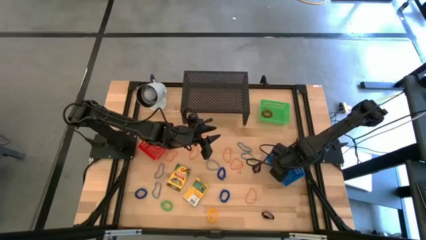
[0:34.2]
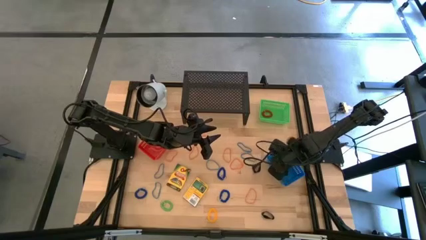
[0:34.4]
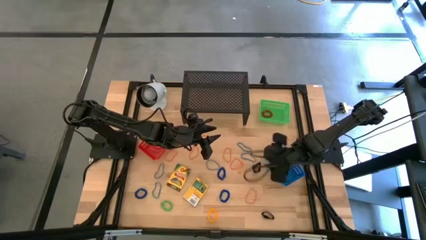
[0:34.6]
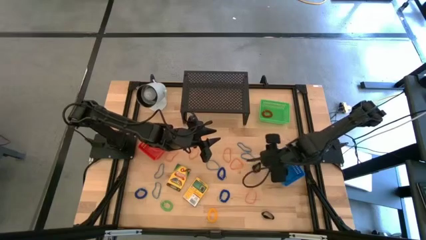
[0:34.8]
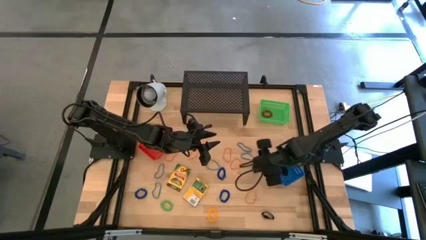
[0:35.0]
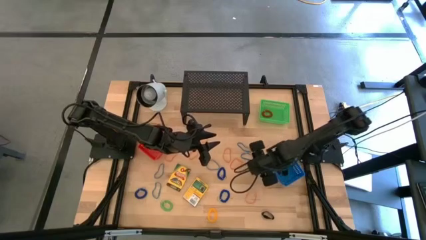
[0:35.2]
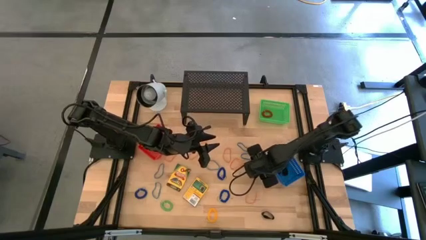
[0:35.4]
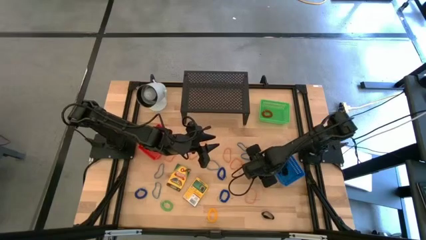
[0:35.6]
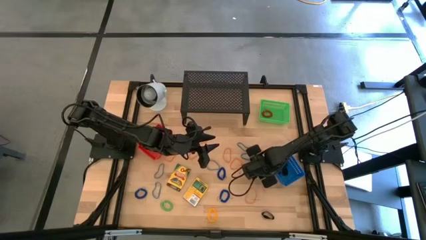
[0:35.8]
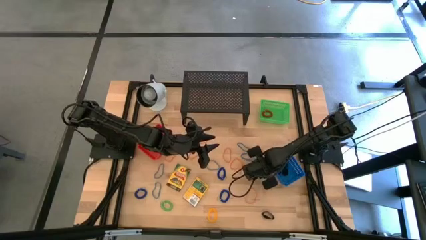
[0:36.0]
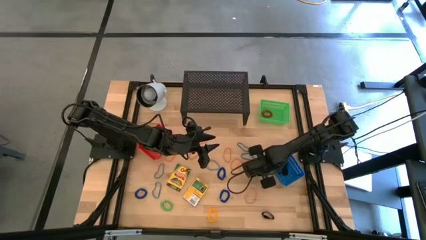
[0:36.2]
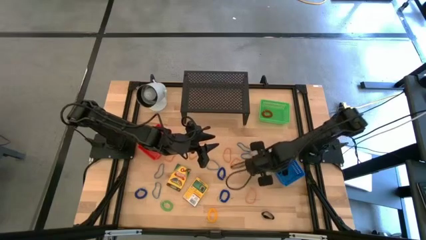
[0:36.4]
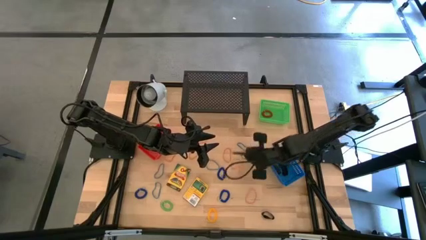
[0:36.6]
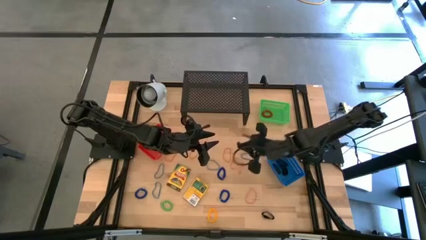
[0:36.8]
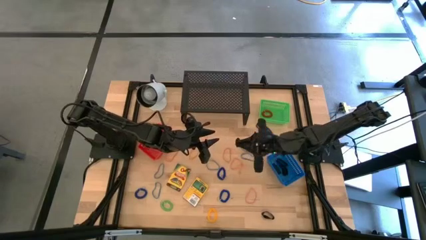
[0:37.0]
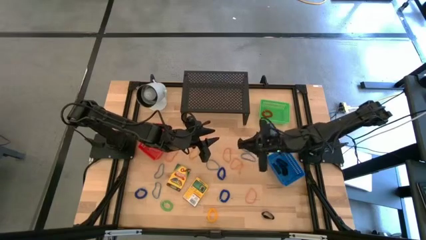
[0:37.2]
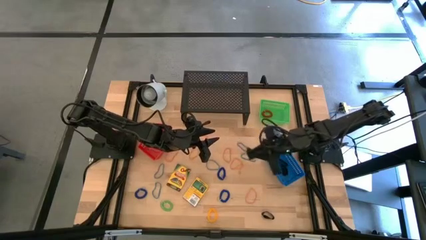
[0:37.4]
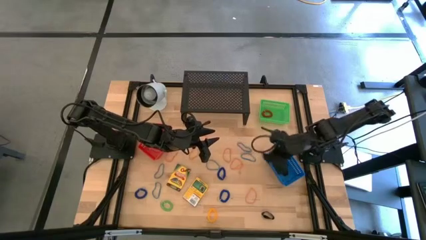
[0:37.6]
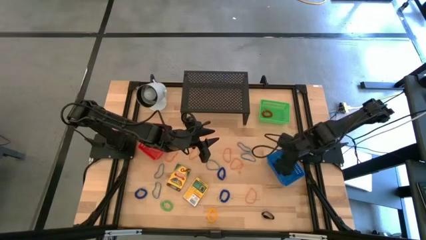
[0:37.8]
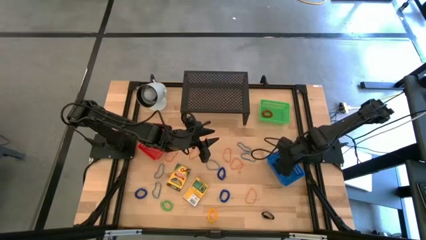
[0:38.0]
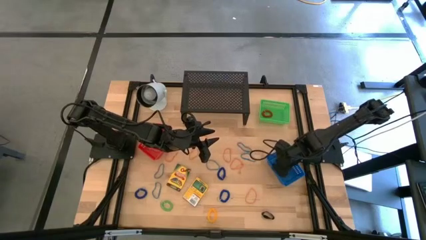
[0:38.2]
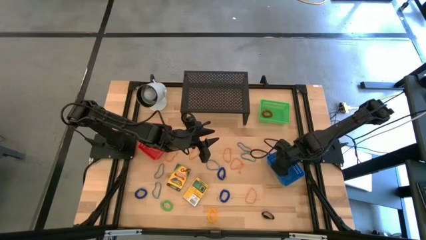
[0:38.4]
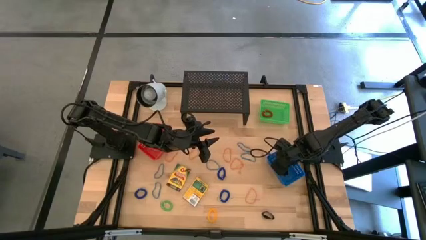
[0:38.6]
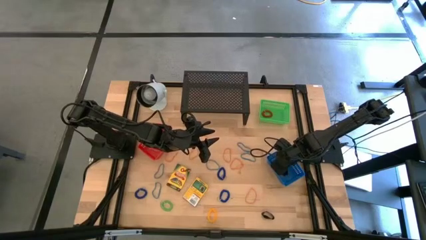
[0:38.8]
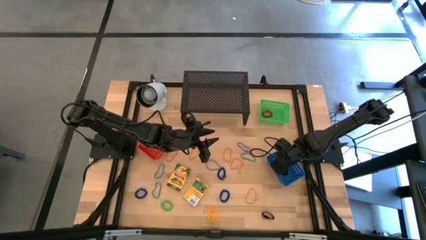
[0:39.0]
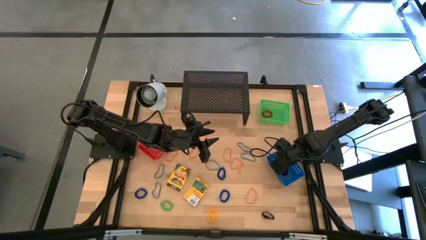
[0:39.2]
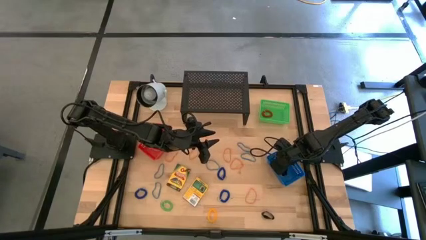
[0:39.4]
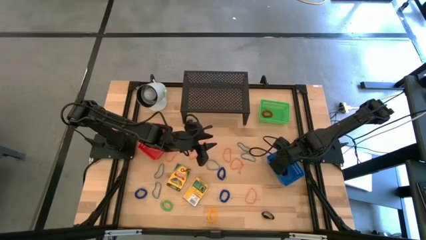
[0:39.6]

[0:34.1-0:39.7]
Task: Pick & Place Office Desk Supplies
Put the black rubber band into the blue bin

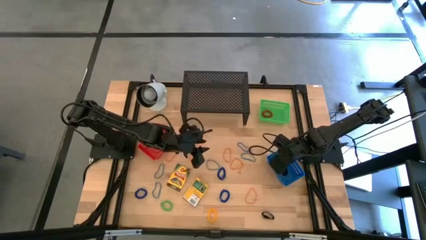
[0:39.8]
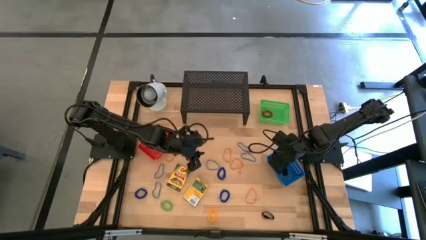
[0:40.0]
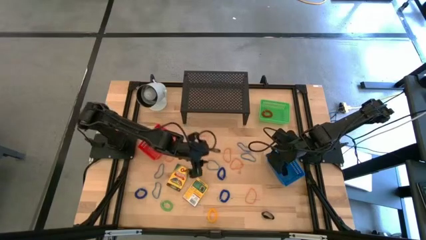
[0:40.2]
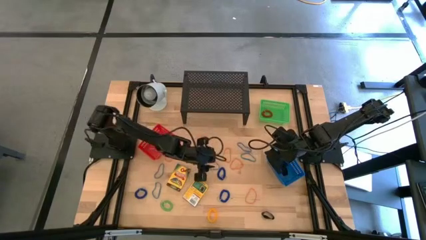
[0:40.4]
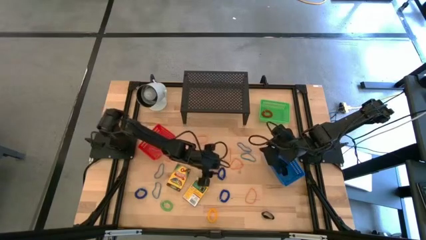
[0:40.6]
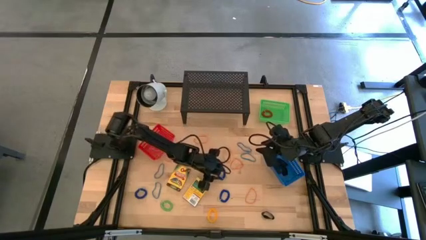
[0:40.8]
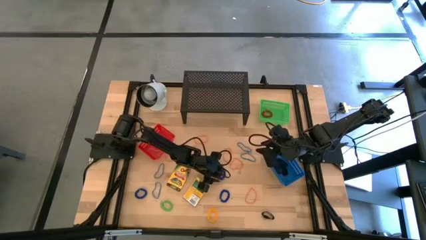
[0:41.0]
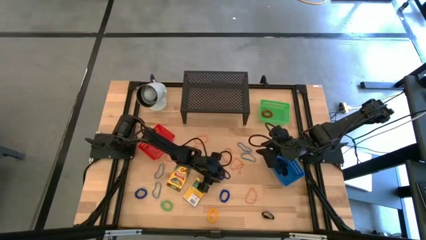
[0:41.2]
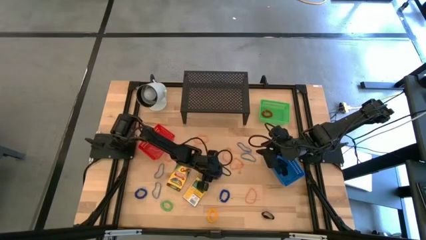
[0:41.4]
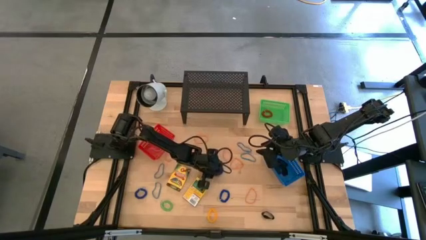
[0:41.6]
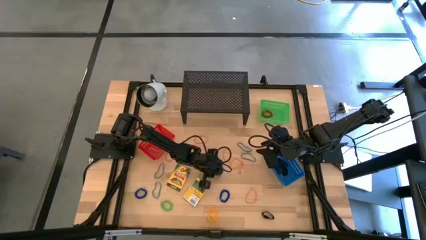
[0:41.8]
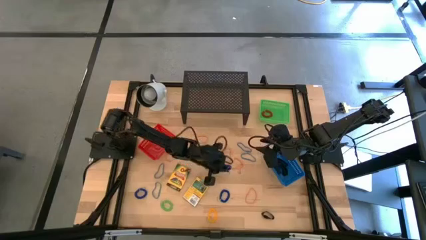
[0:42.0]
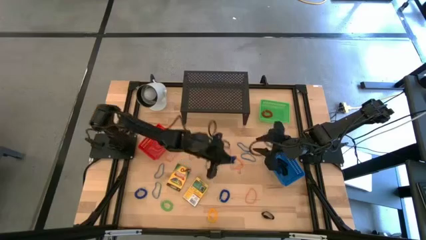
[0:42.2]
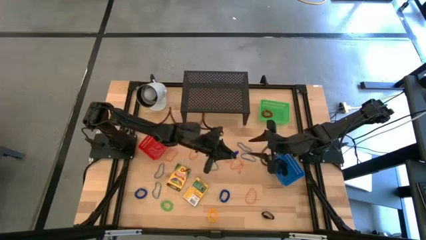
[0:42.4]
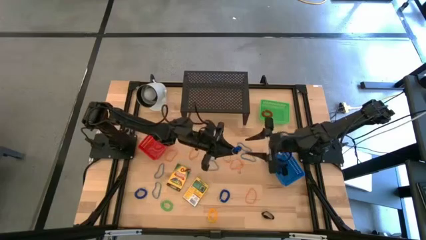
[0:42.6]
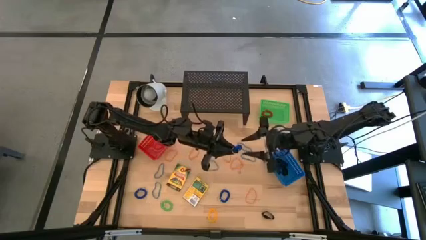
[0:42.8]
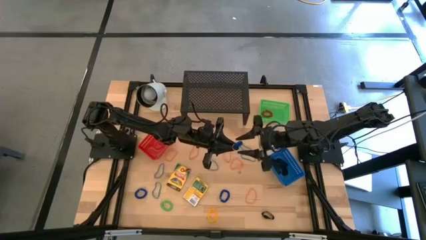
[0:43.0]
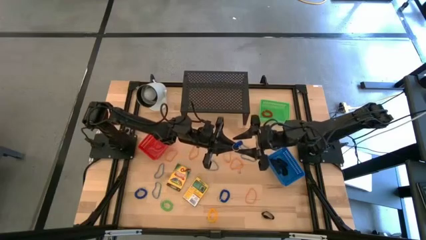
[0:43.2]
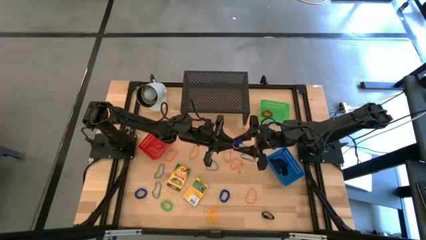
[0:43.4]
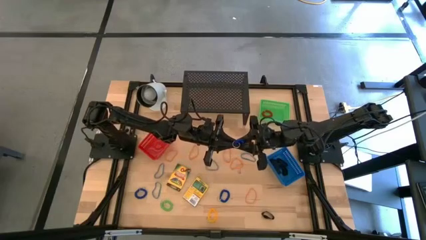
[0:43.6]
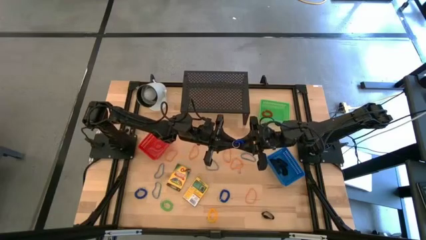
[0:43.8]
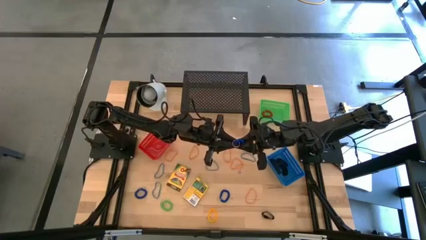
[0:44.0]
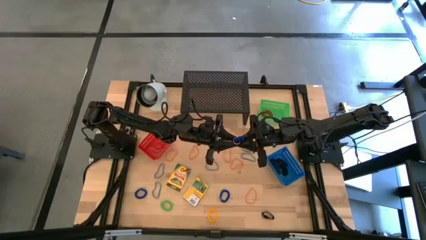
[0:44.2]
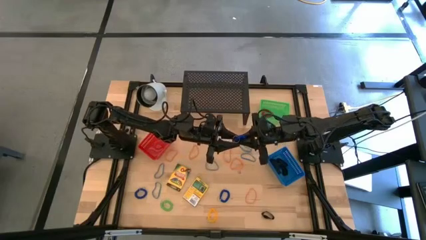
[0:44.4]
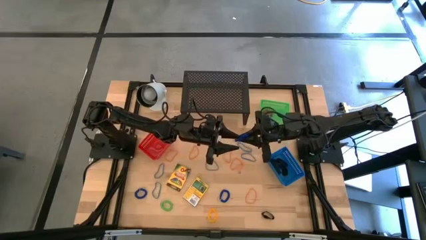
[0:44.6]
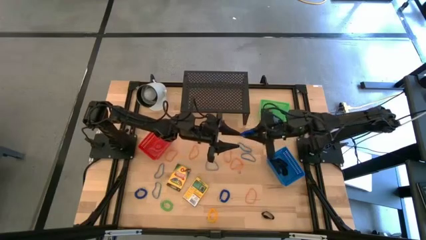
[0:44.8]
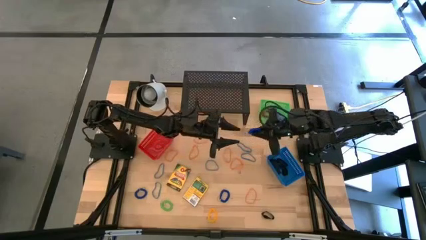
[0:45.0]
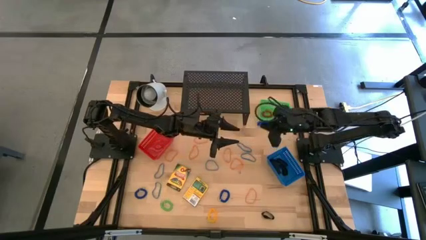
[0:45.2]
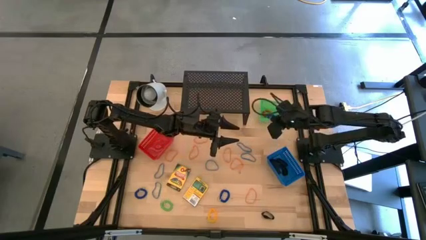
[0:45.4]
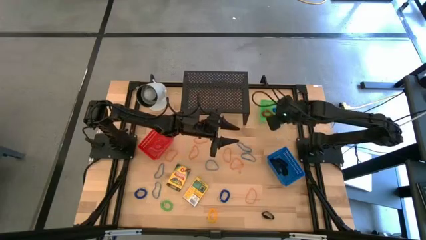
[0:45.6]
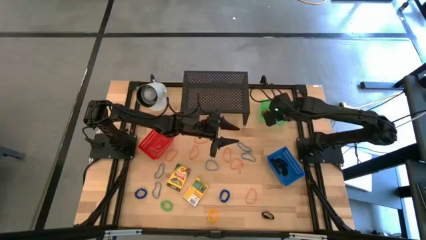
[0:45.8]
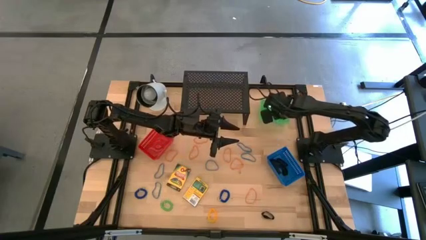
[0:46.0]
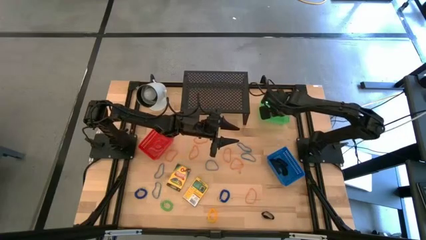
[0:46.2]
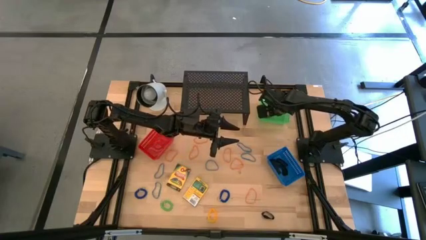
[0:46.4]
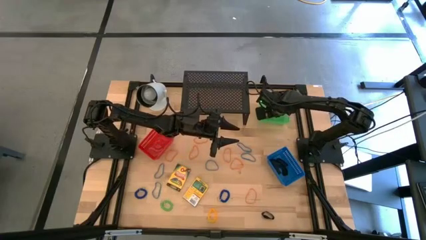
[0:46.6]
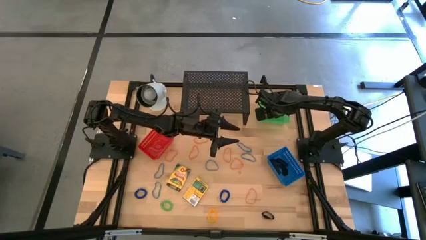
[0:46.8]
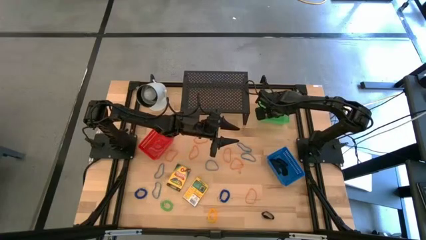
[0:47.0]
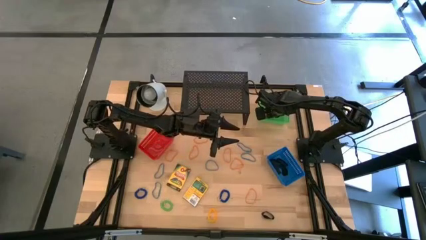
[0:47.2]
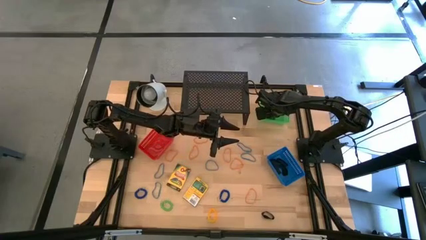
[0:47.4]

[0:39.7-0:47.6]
Put the spring keychain into the green bin
